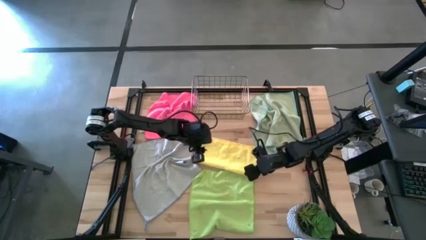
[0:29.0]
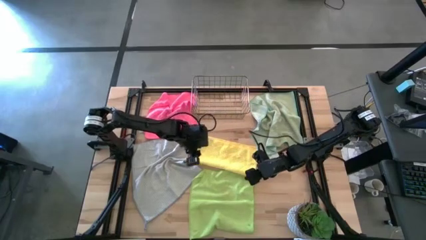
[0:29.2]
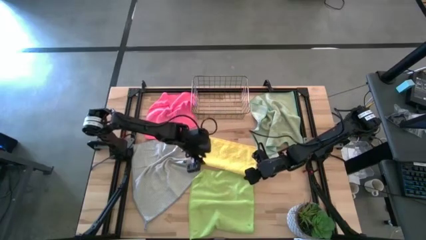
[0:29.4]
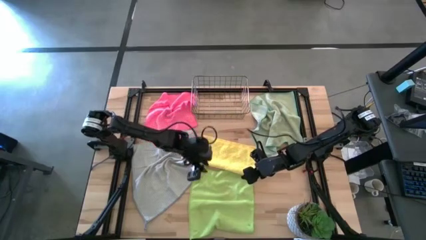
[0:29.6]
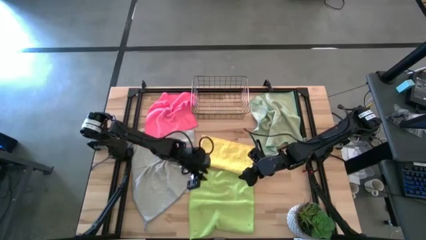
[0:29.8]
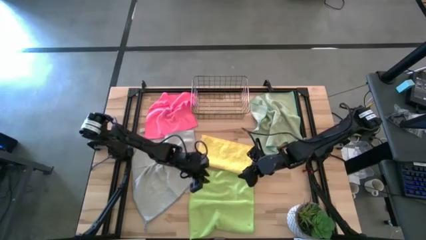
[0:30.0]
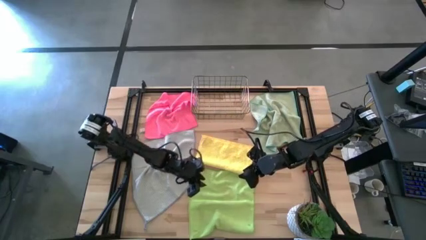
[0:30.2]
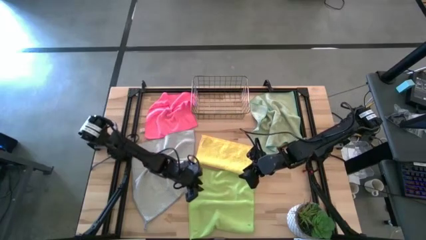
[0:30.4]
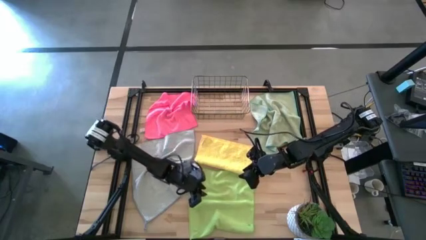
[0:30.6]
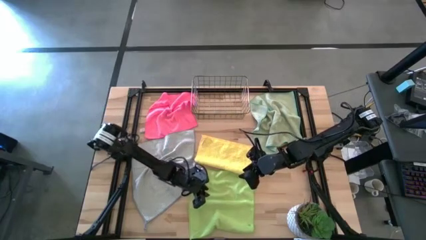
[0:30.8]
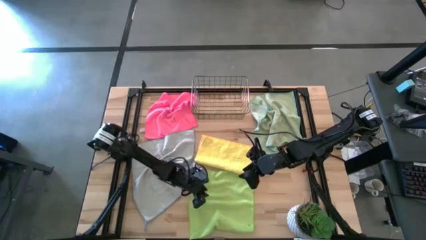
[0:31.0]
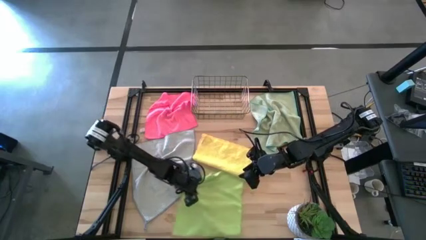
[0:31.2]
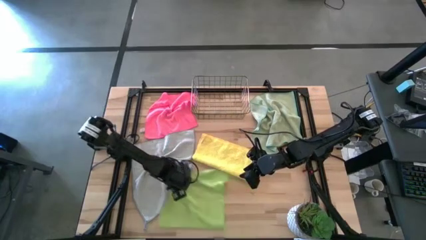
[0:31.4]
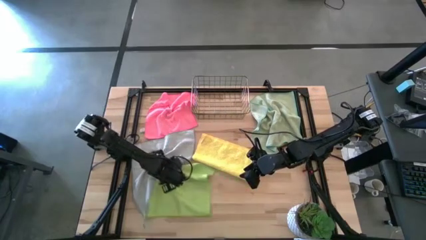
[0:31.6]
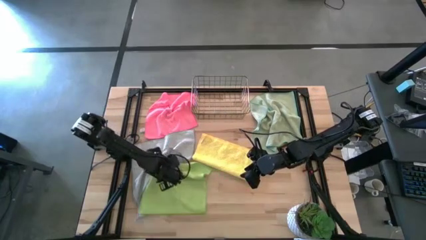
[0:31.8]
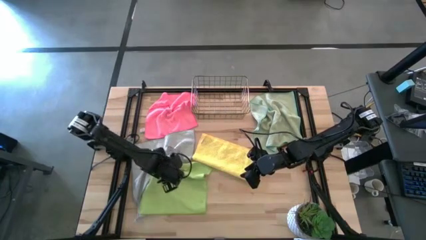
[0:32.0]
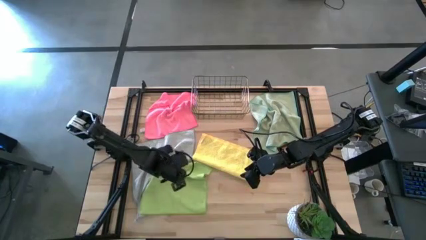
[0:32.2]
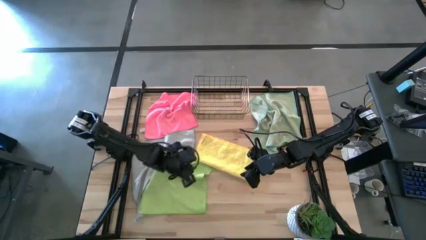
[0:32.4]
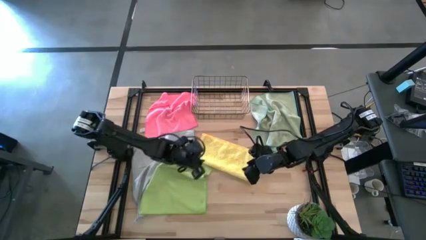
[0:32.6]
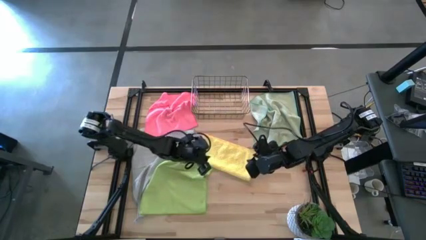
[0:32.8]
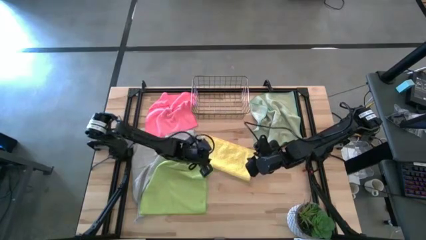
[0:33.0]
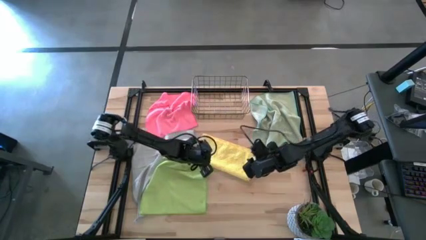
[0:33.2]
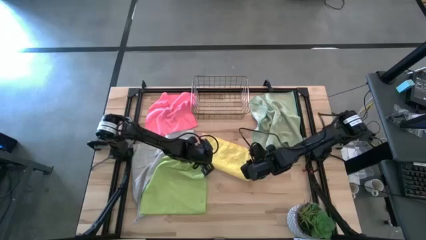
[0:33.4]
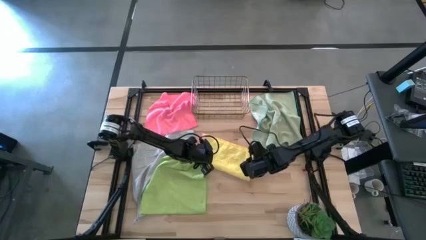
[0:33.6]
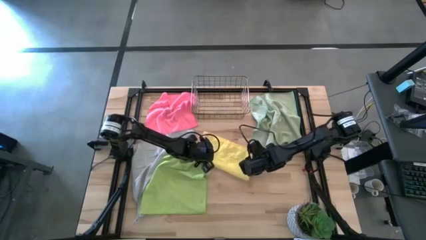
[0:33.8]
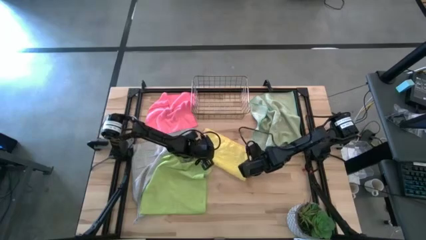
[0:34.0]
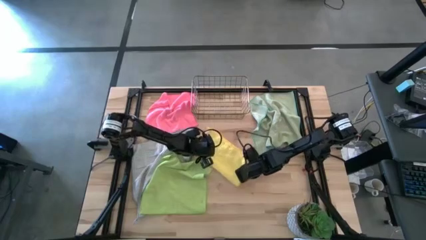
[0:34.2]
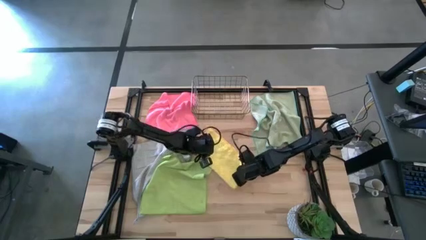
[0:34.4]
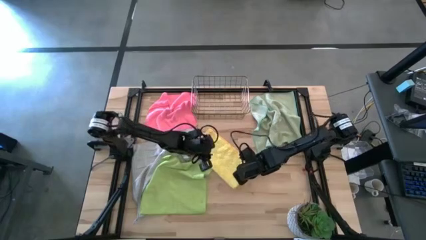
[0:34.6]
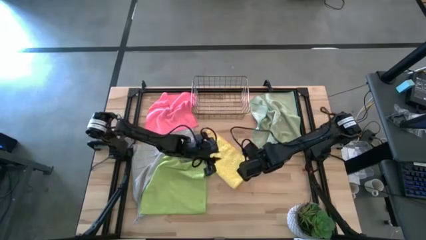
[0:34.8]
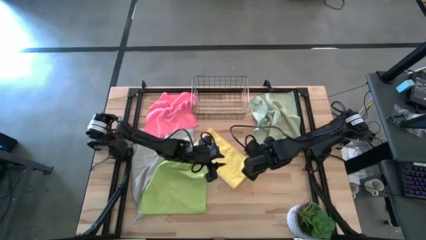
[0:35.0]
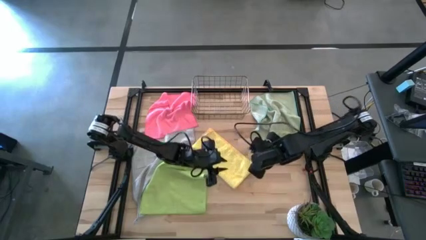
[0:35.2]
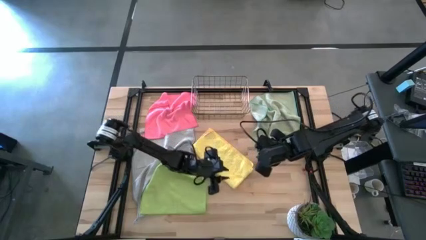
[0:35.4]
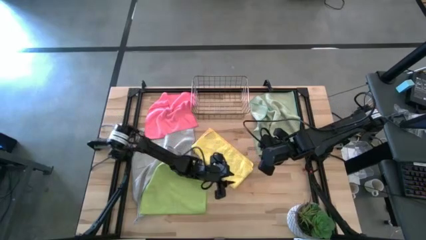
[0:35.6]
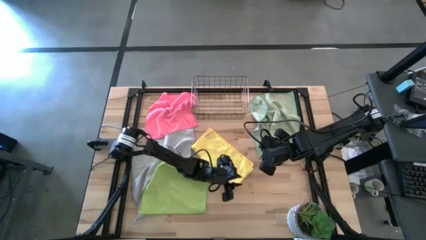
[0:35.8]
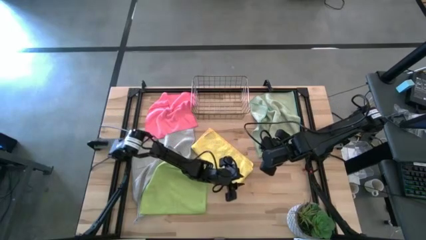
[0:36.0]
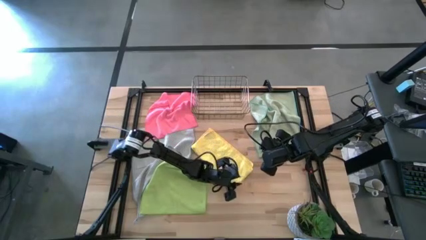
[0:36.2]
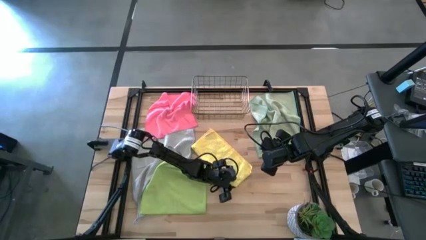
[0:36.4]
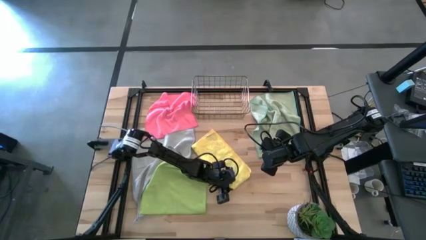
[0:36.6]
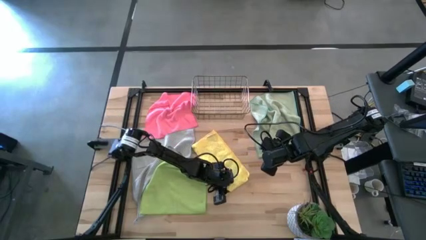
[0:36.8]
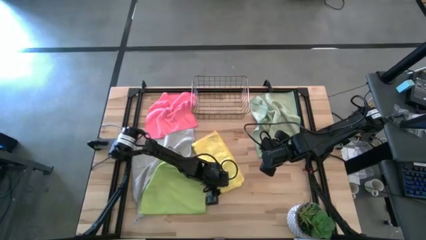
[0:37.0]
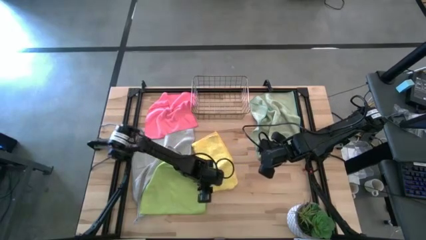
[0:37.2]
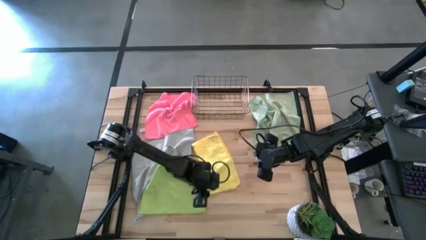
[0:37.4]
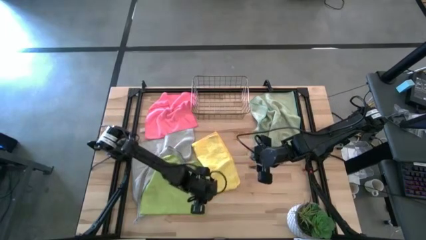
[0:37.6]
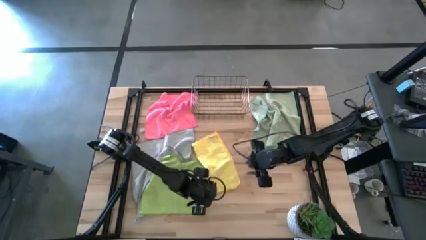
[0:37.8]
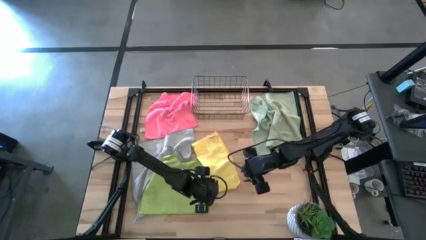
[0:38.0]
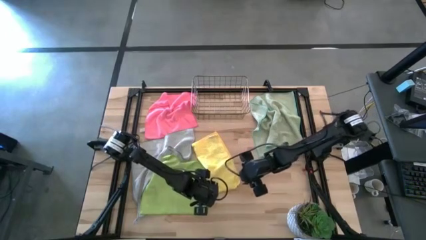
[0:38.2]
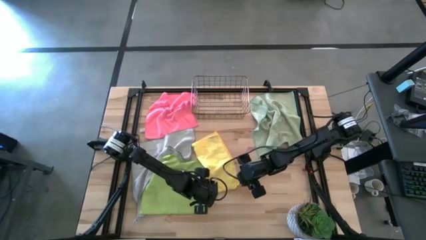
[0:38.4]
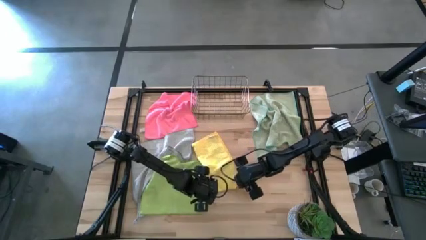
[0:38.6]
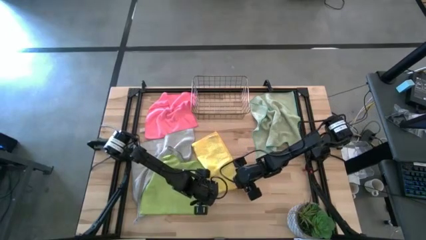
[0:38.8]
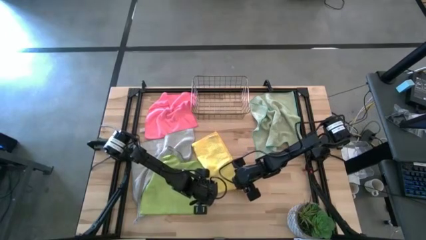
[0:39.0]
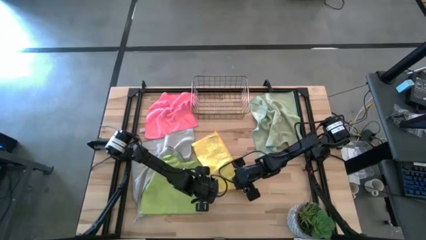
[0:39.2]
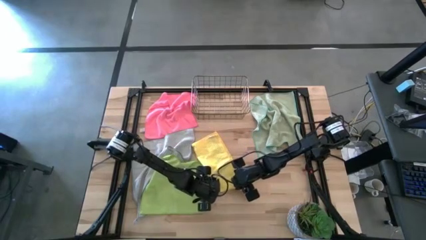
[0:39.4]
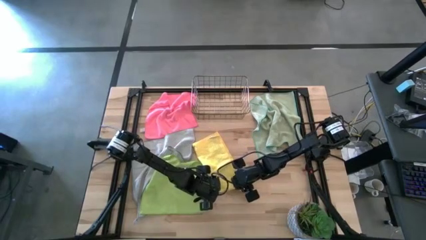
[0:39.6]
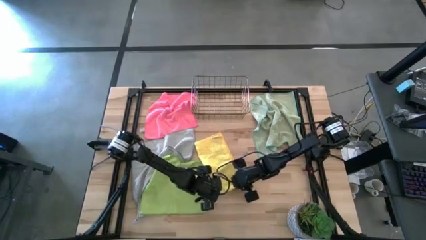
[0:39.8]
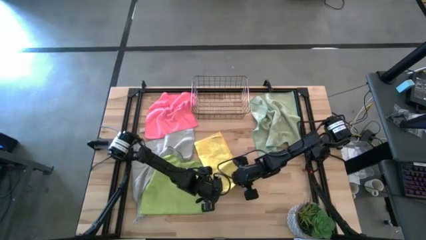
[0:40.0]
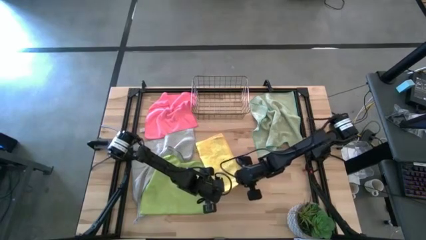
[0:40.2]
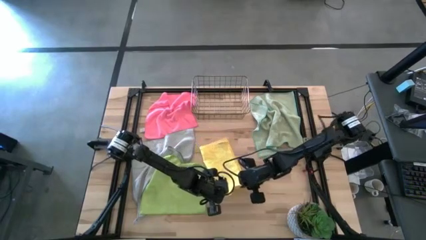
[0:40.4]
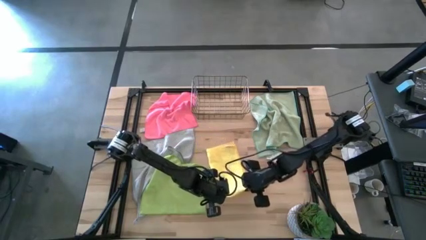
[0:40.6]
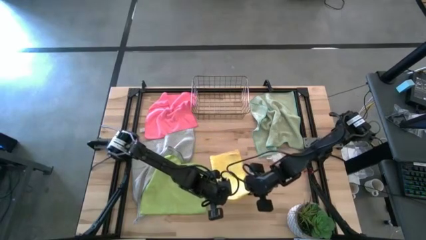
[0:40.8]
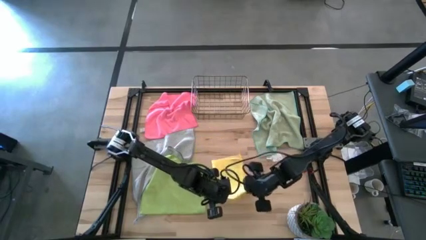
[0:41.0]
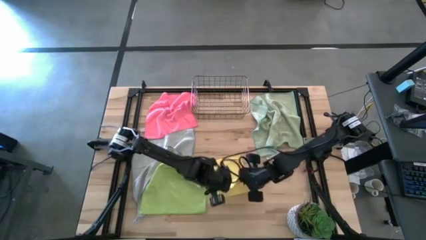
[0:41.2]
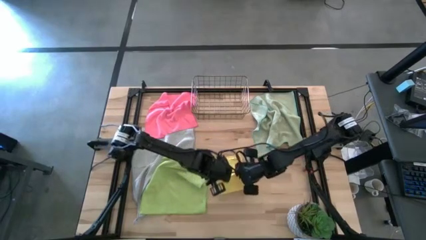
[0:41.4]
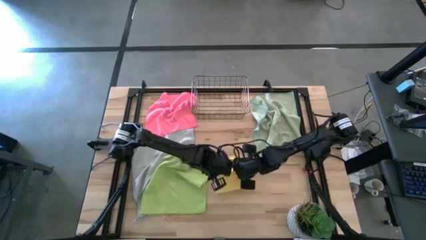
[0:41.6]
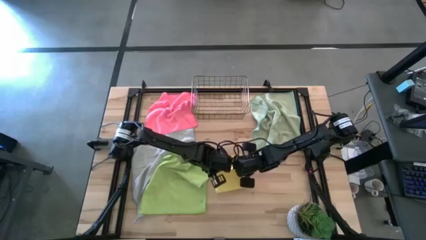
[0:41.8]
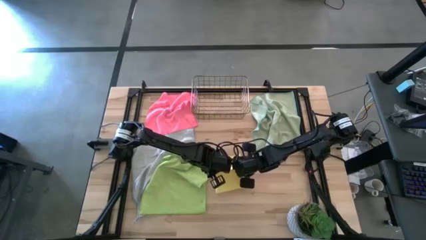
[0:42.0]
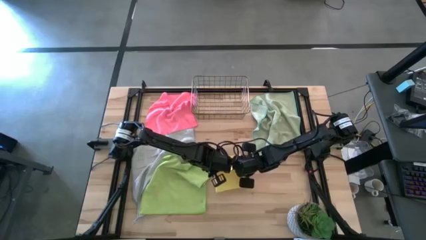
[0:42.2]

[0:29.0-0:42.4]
Task: Fold microfiber towels
Fold the yellow towel
